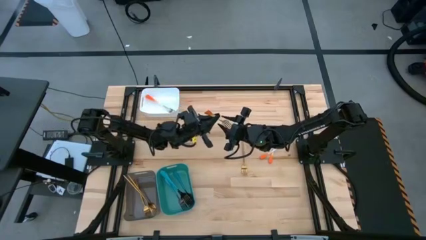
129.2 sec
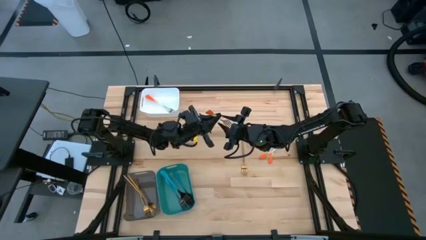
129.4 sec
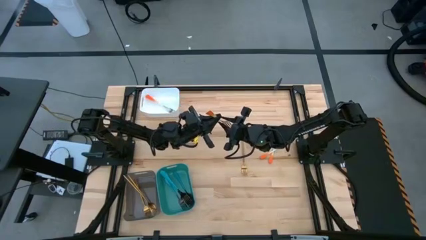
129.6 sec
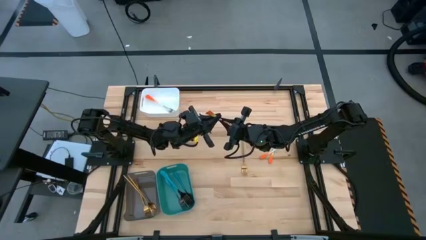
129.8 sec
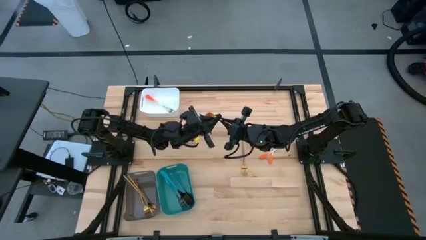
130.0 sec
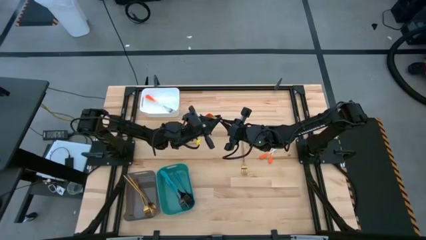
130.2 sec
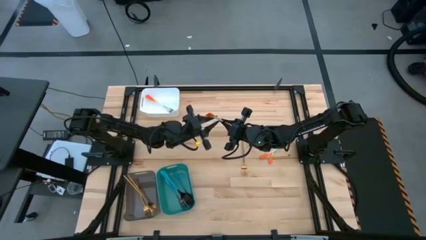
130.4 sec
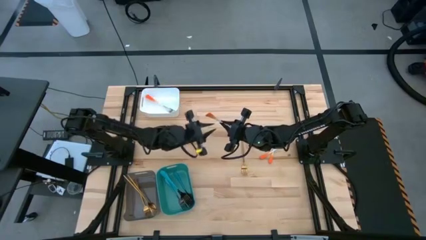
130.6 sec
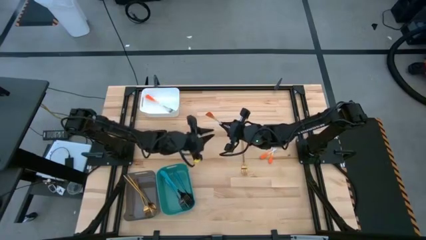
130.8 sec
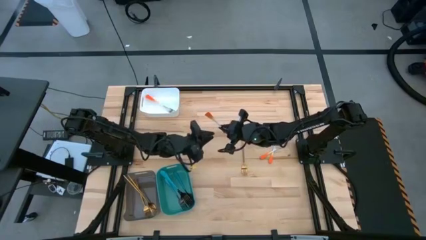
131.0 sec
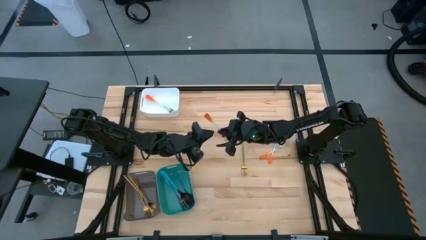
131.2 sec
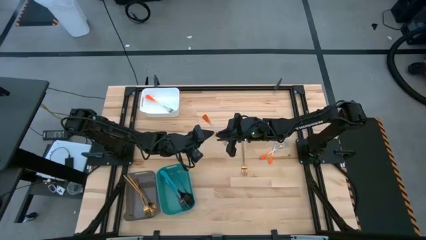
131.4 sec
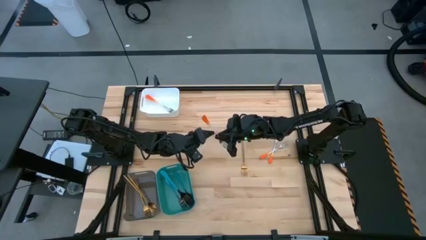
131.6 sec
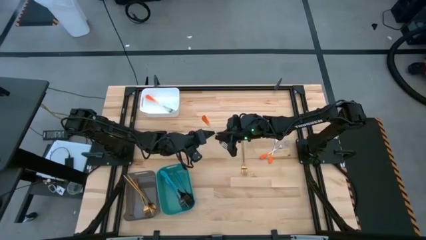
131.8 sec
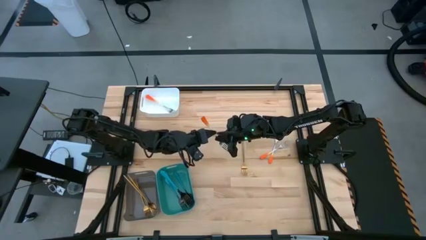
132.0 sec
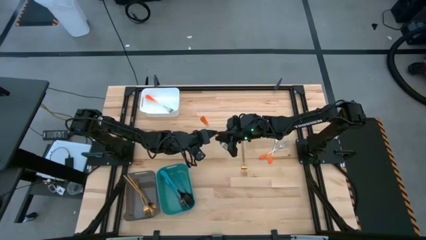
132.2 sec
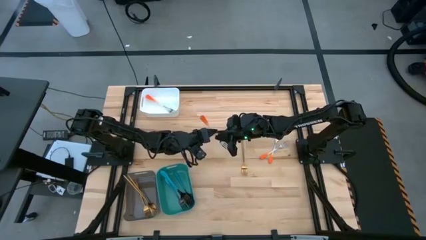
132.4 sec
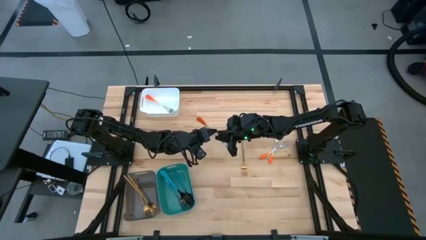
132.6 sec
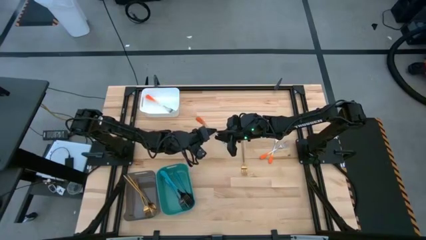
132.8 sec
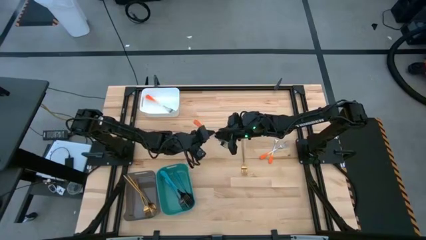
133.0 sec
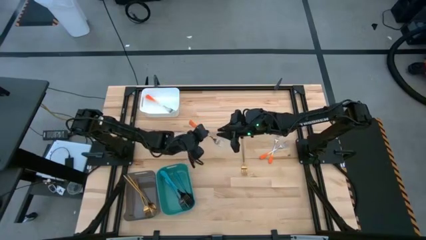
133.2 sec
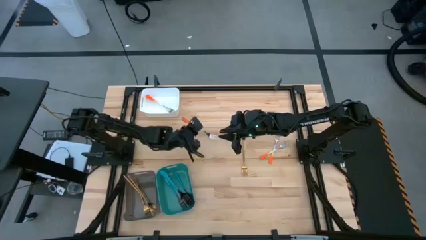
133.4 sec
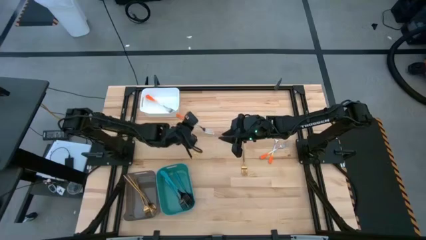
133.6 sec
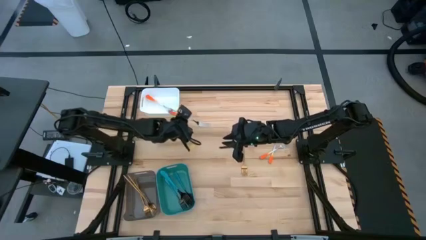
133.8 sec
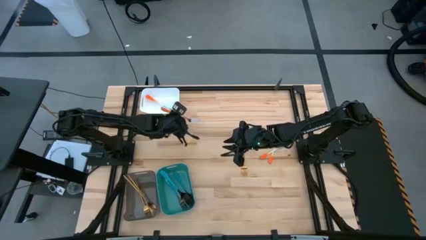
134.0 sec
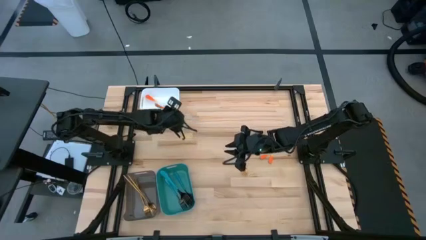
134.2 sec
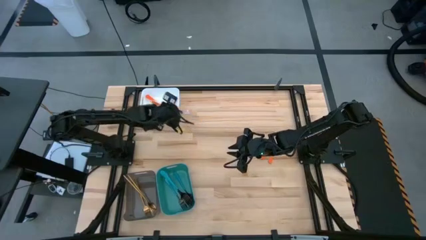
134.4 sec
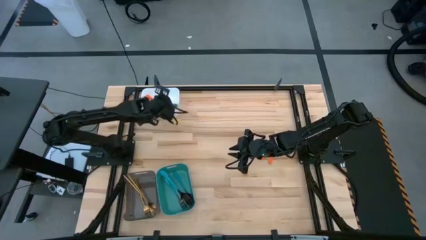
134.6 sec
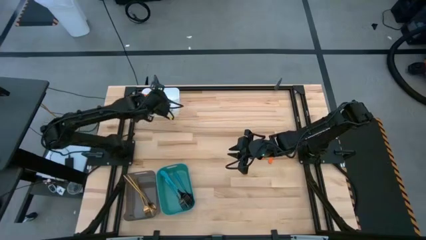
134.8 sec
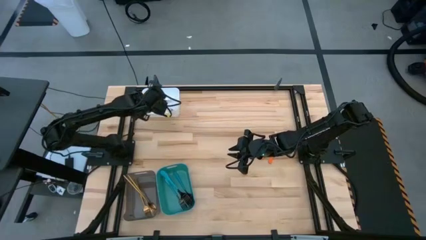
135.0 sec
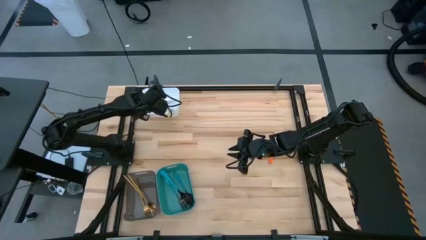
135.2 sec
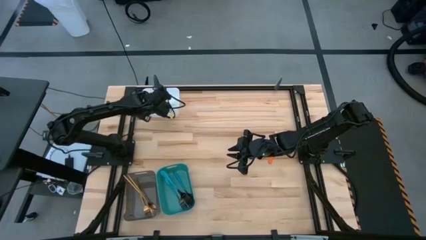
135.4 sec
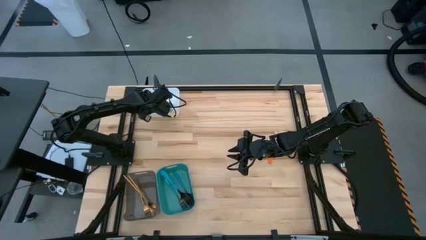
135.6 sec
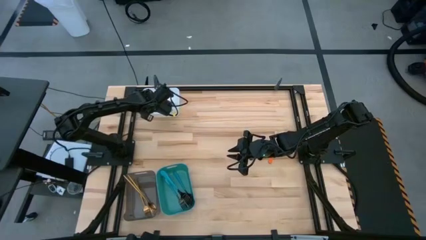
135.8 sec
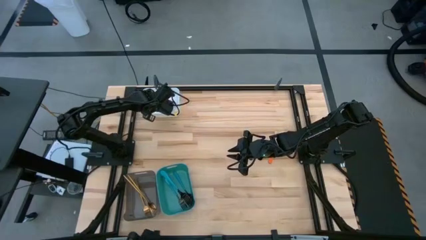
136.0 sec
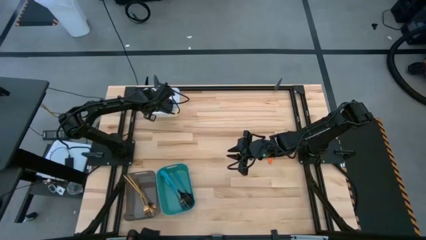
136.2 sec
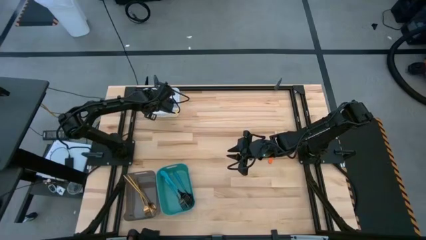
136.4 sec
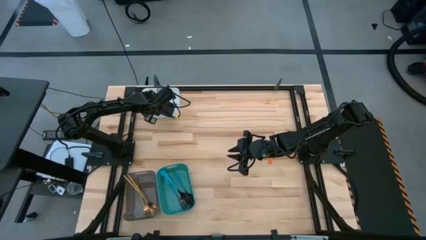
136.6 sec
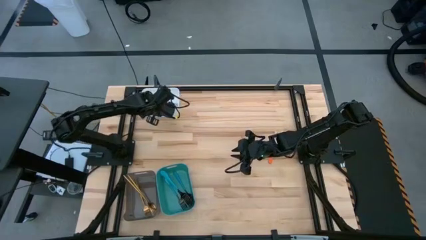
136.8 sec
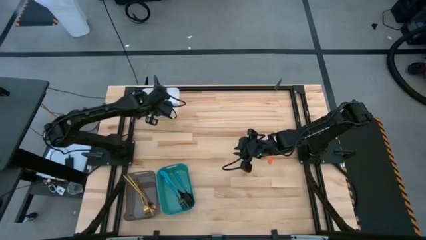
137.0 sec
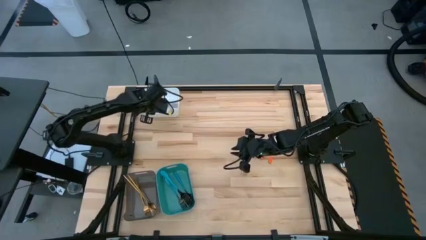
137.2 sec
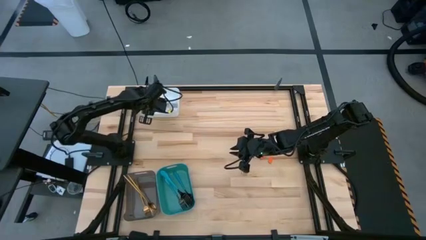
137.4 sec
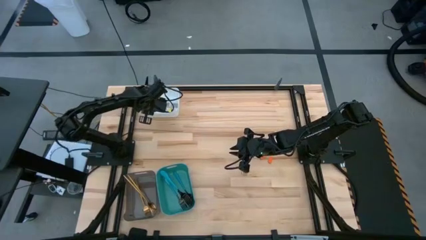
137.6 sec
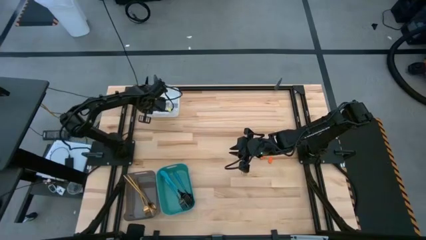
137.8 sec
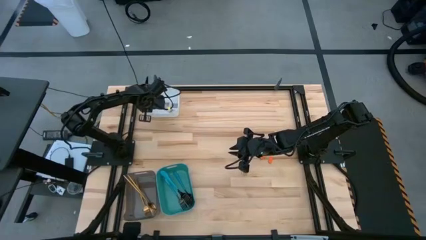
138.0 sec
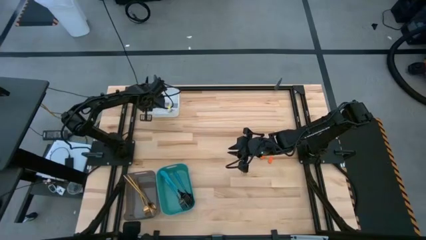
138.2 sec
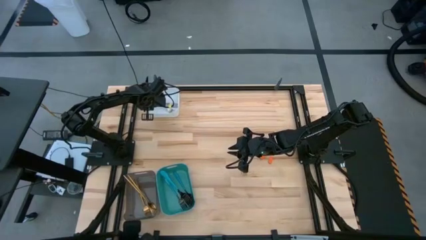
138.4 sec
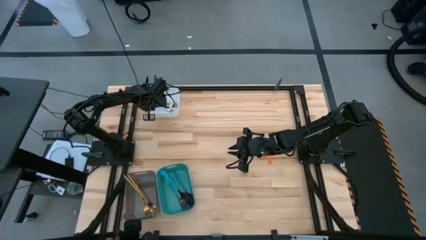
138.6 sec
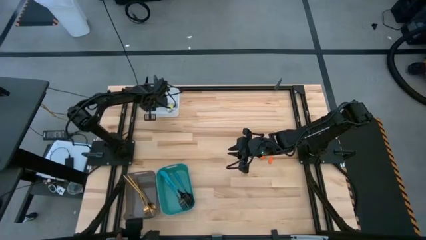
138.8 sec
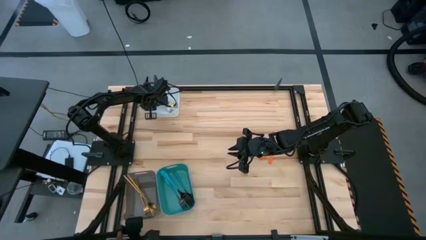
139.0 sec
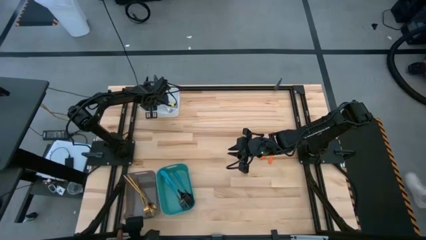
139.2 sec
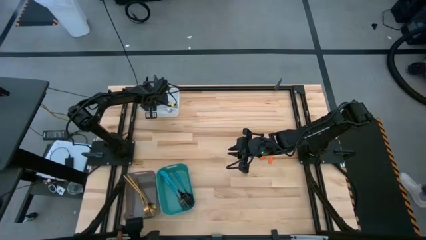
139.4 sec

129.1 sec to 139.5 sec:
Task: Sort silverware by color (type)
Put the orange fork into the white bin

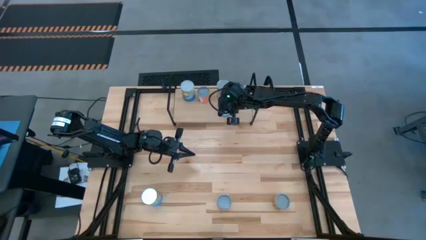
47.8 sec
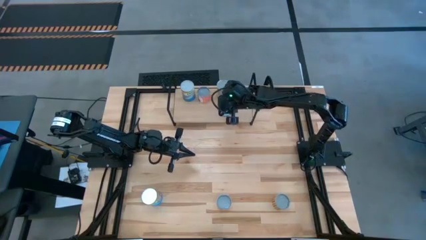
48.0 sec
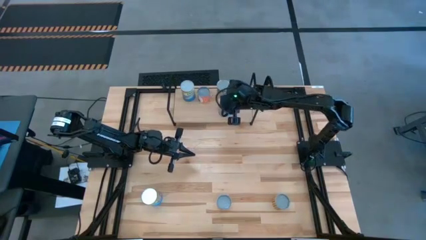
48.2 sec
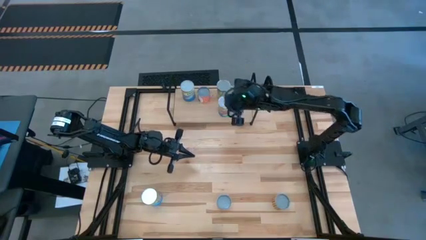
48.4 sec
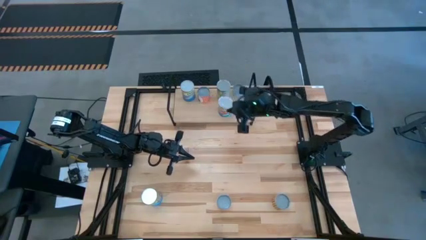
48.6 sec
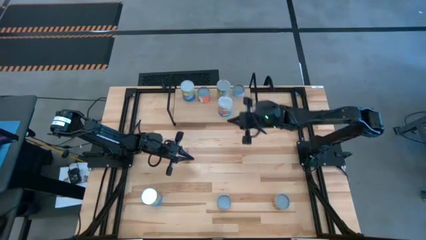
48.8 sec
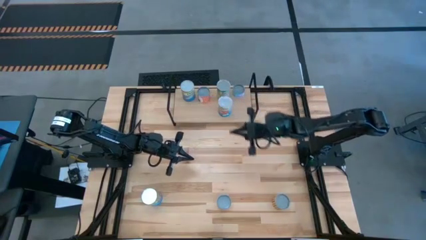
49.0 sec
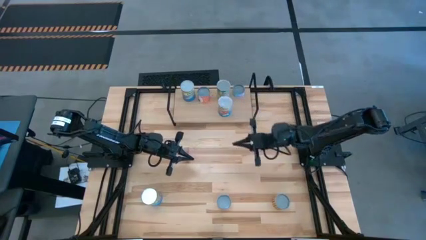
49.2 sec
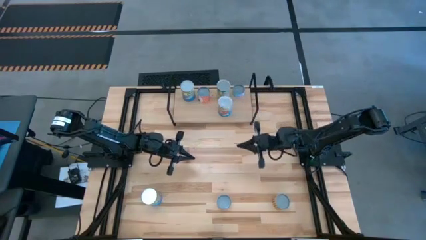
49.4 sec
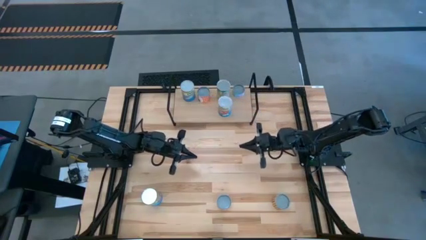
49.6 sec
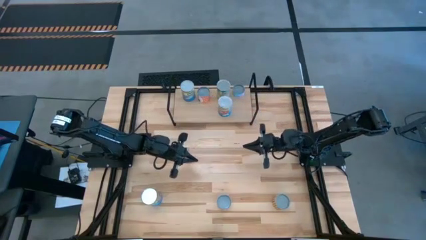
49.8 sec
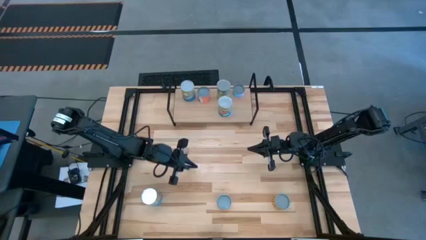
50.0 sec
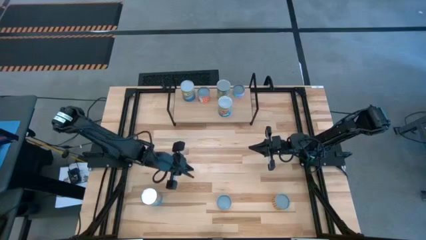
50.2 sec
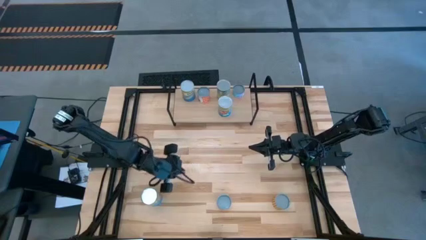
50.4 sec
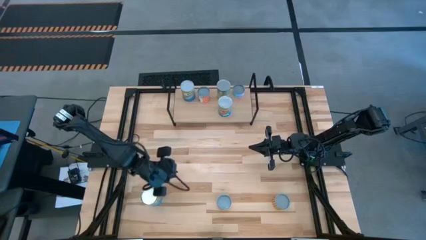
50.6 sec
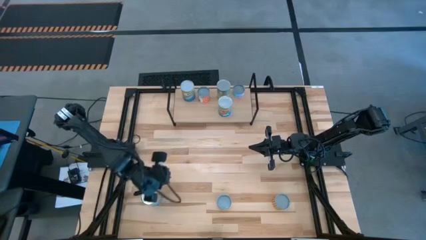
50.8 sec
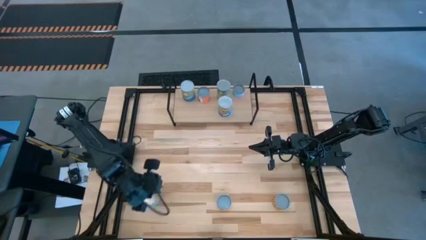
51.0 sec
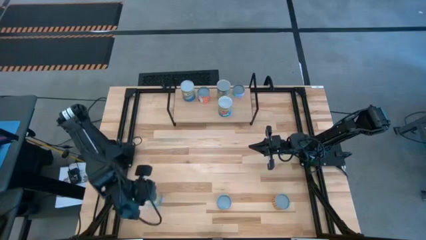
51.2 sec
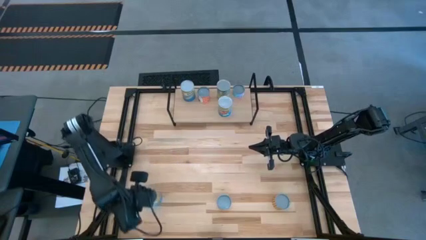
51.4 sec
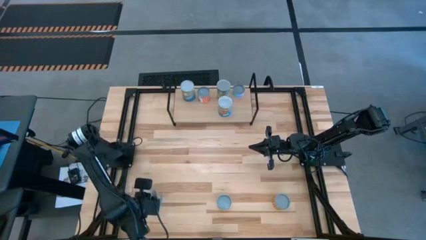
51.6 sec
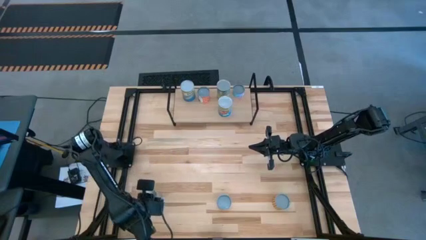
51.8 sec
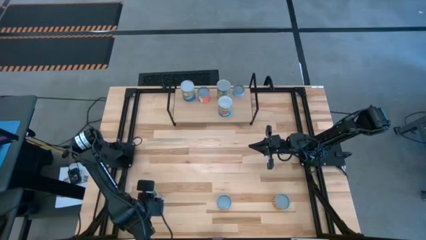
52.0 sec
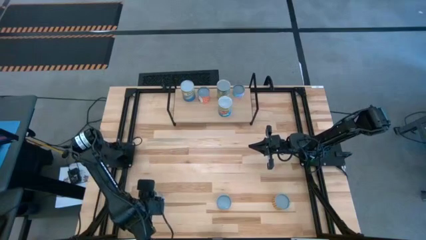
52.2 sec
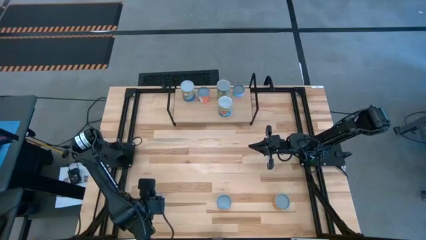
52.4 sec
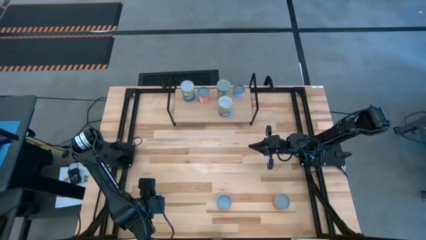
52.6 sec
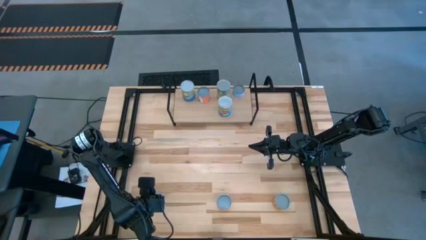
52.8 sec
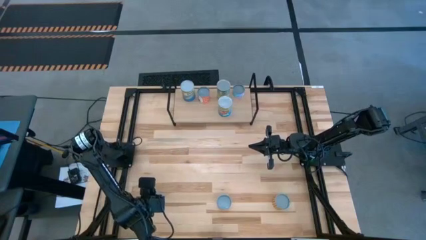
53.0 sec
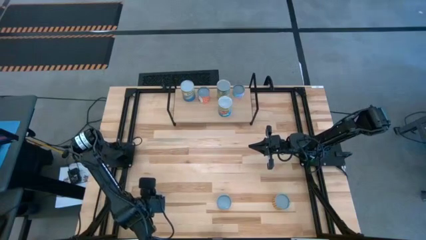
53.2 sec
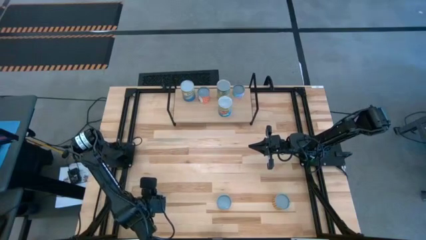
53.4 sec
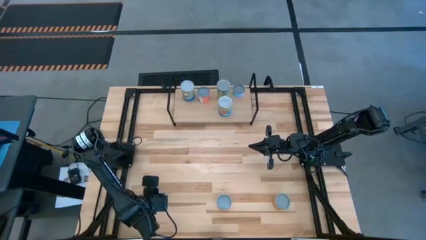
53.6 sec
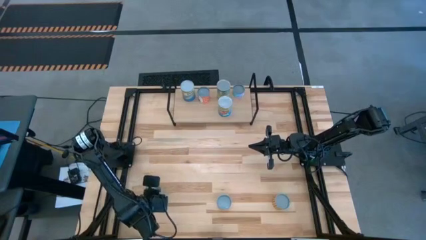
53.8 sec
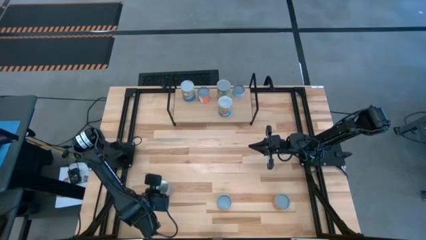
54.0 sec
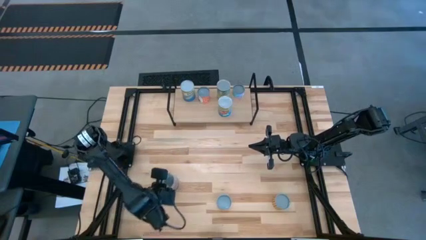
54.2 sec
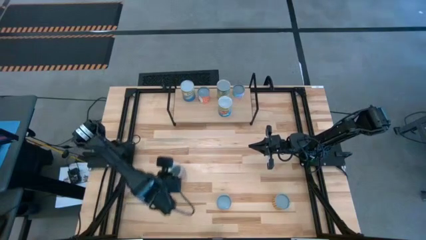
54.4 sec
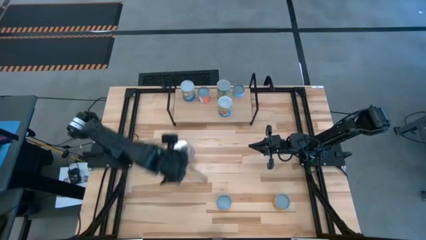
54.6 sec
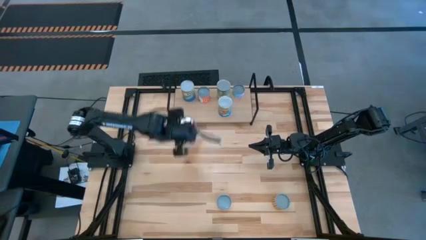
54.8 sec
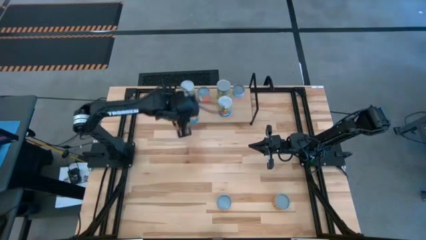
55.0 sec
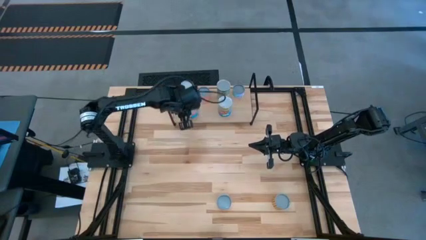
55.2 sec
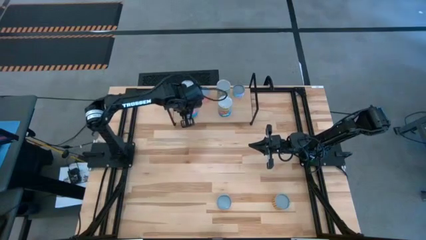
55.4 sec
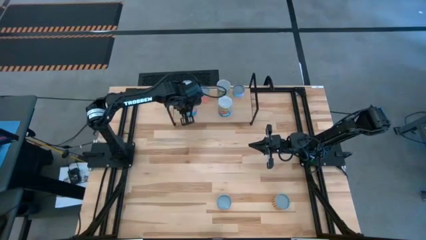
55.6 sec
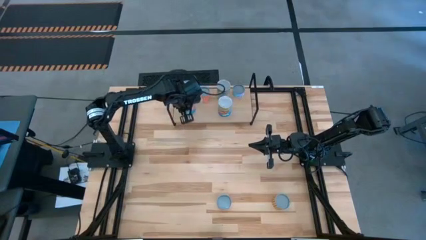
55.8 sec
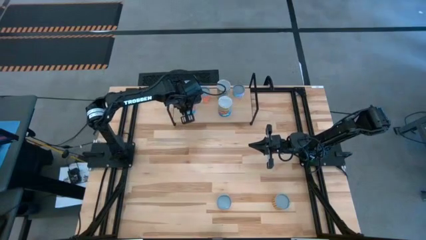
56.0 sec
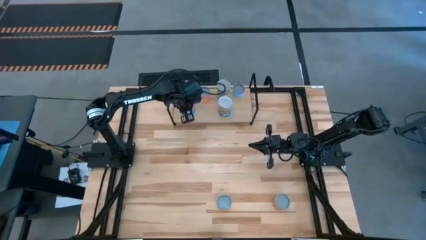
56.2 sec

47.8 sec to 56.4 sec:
Task: Pick and place cans onto a shelf
Put the canned tomatoes on the shelf
